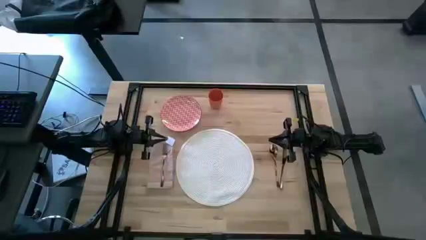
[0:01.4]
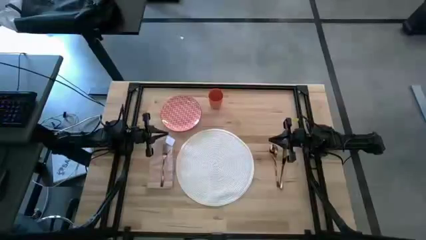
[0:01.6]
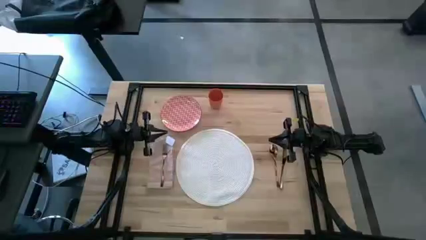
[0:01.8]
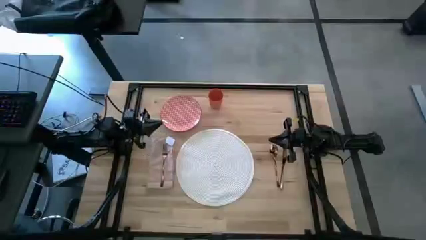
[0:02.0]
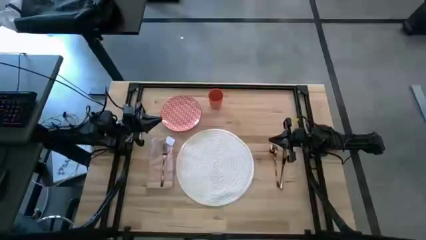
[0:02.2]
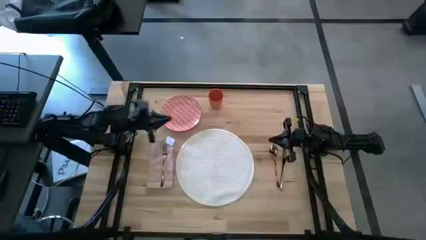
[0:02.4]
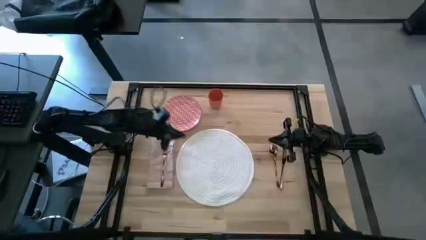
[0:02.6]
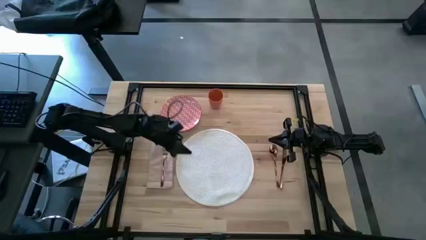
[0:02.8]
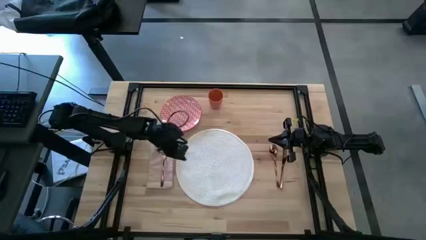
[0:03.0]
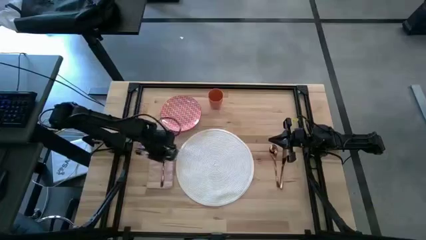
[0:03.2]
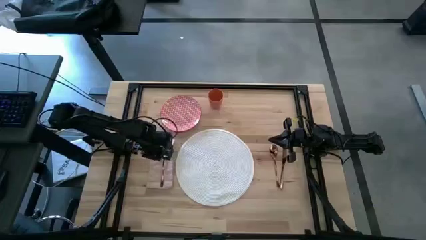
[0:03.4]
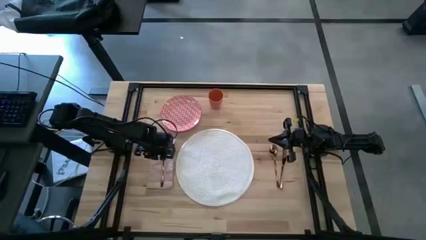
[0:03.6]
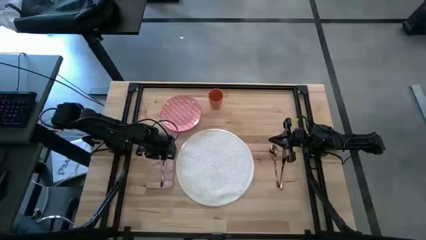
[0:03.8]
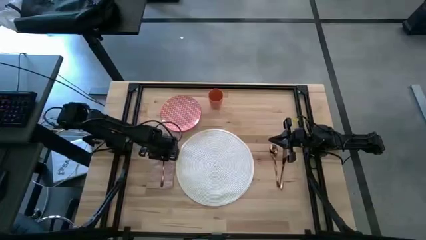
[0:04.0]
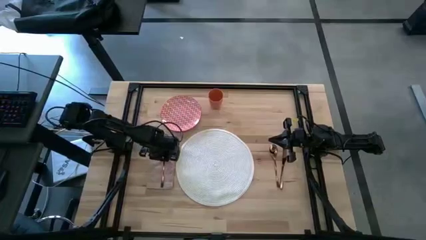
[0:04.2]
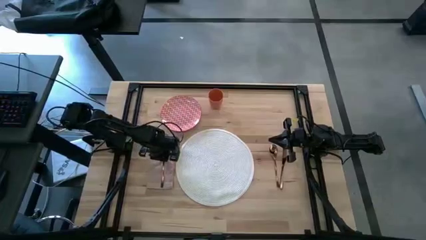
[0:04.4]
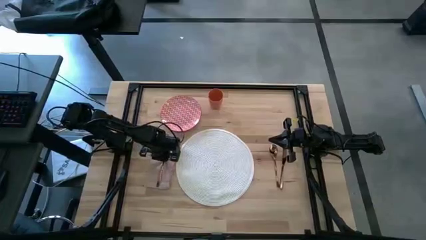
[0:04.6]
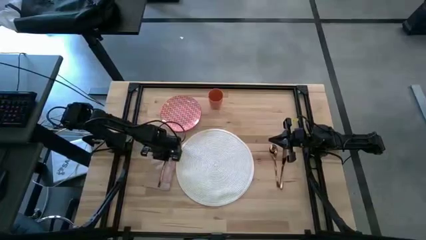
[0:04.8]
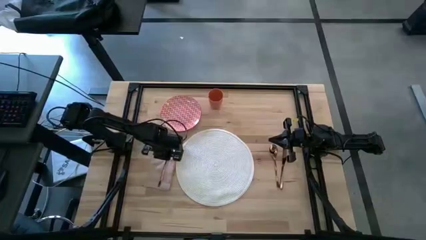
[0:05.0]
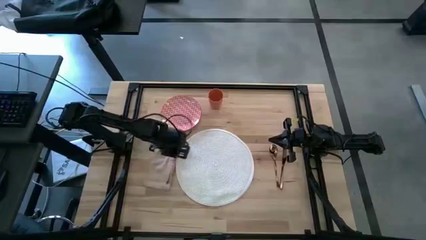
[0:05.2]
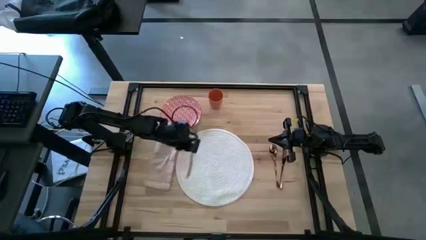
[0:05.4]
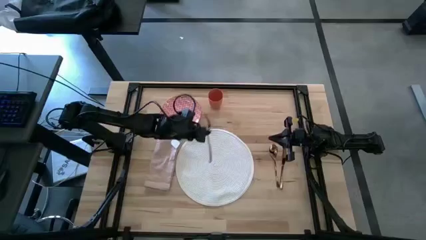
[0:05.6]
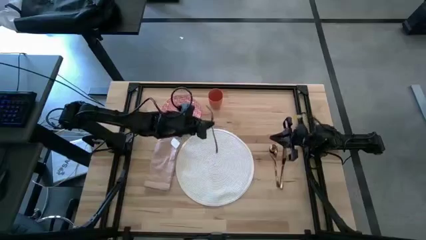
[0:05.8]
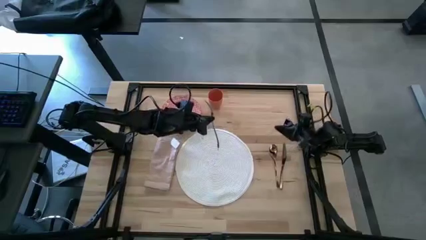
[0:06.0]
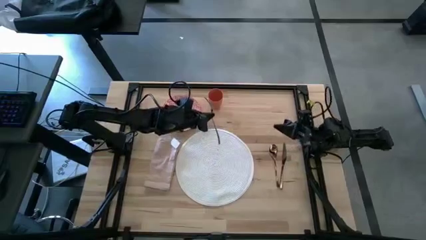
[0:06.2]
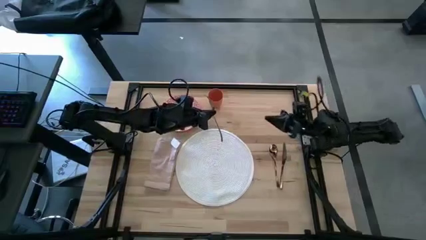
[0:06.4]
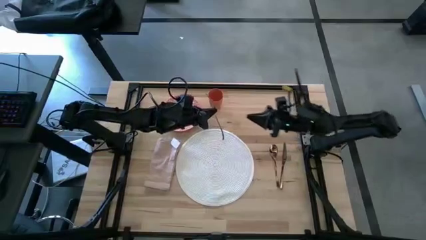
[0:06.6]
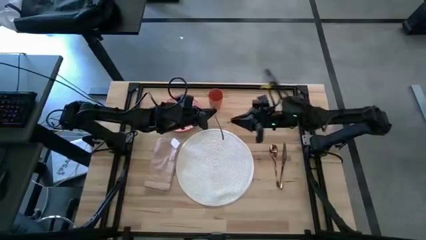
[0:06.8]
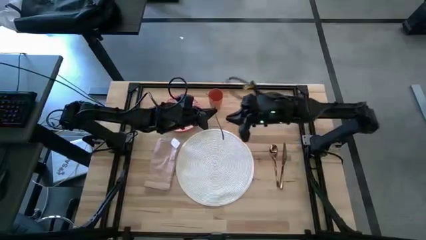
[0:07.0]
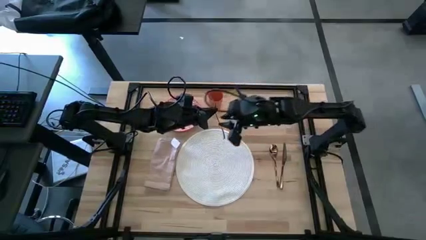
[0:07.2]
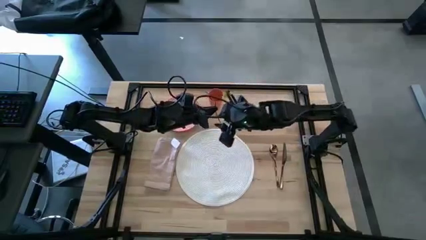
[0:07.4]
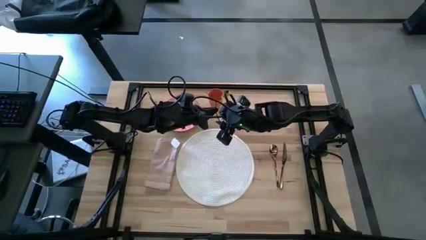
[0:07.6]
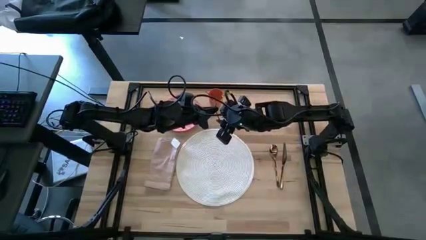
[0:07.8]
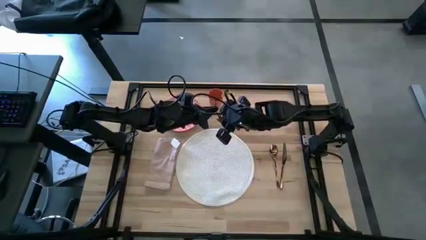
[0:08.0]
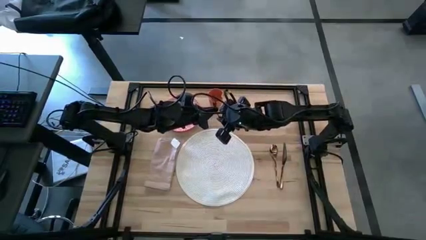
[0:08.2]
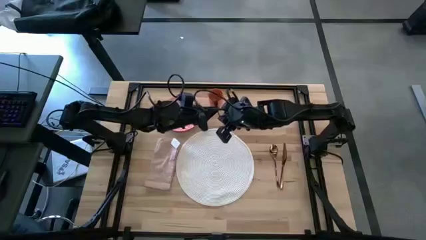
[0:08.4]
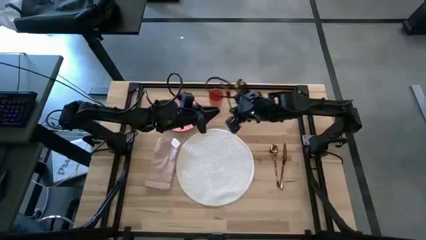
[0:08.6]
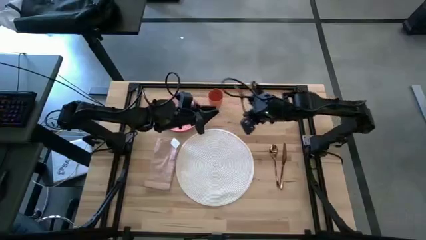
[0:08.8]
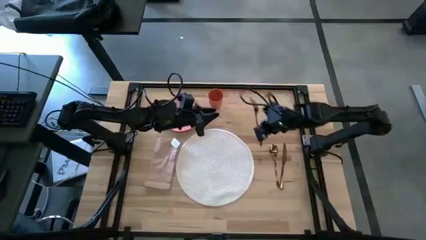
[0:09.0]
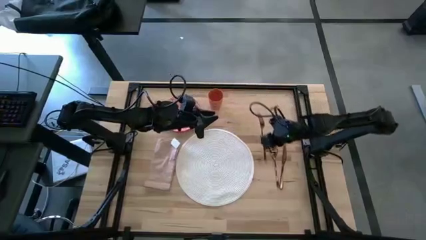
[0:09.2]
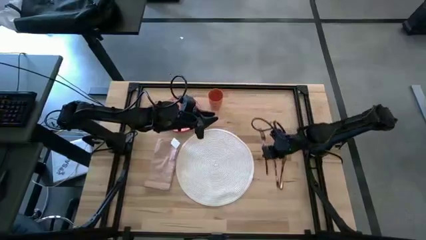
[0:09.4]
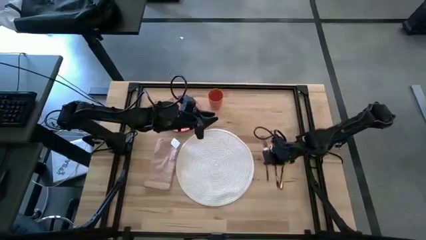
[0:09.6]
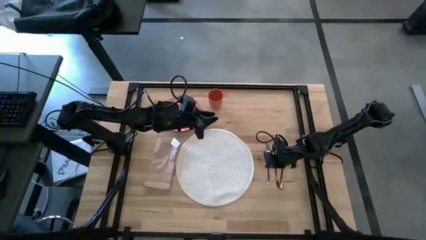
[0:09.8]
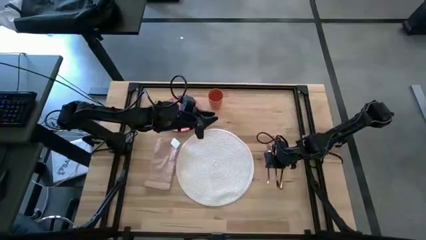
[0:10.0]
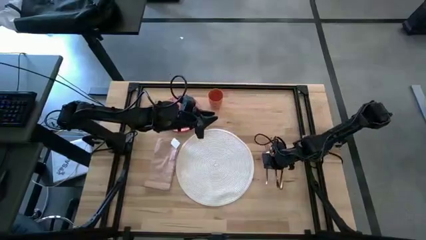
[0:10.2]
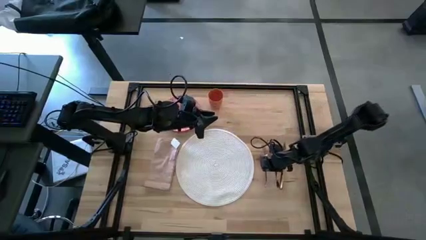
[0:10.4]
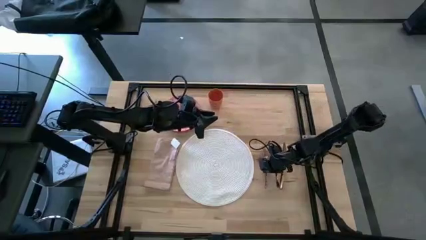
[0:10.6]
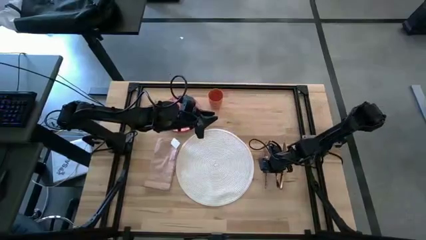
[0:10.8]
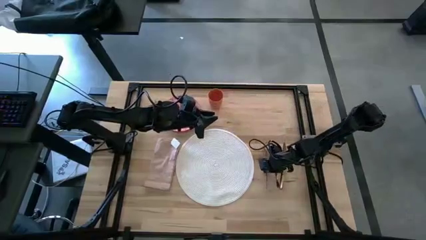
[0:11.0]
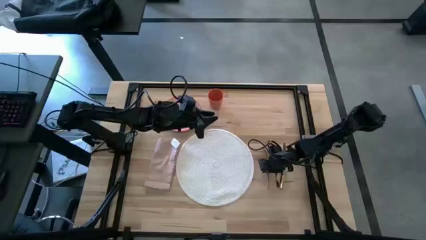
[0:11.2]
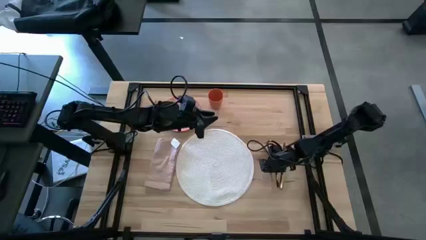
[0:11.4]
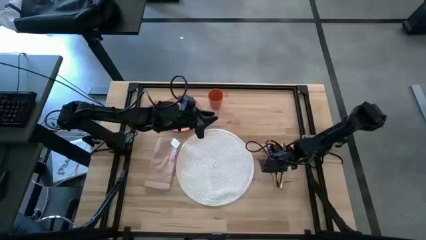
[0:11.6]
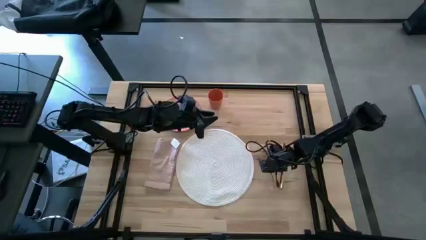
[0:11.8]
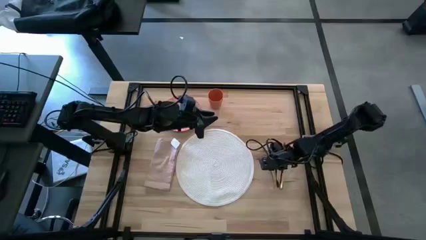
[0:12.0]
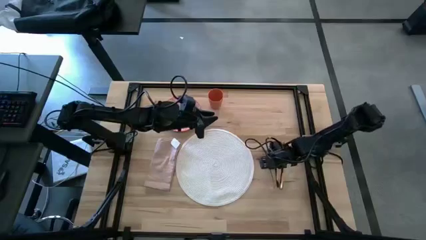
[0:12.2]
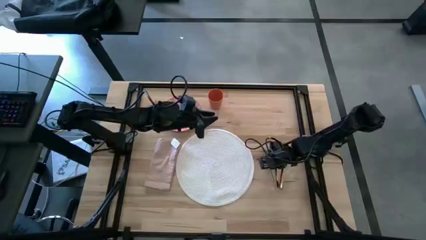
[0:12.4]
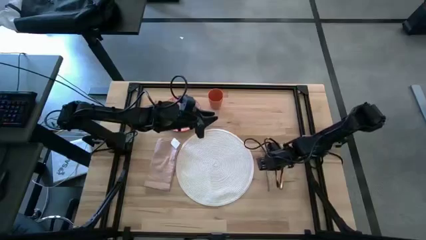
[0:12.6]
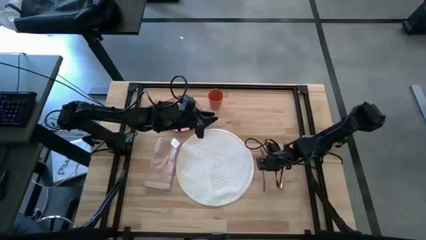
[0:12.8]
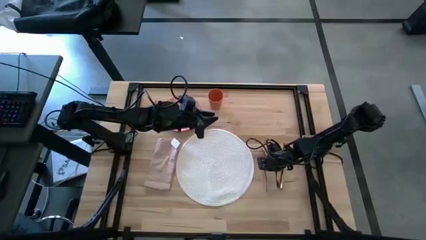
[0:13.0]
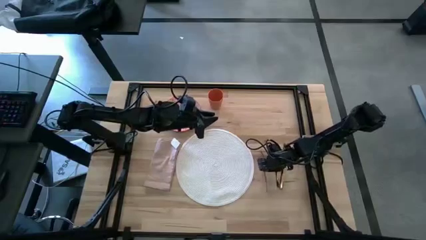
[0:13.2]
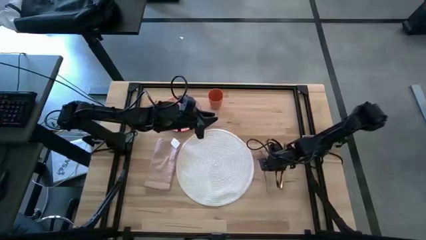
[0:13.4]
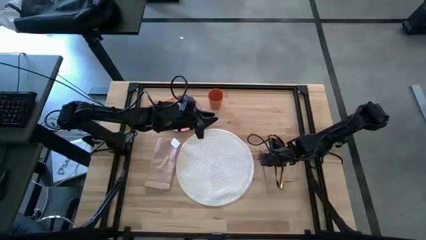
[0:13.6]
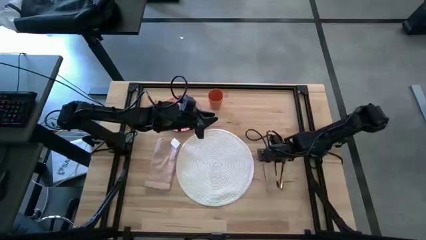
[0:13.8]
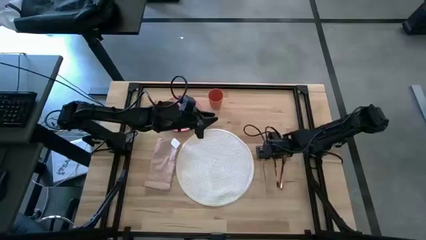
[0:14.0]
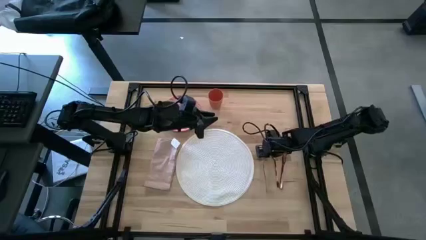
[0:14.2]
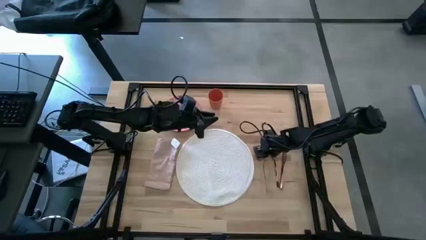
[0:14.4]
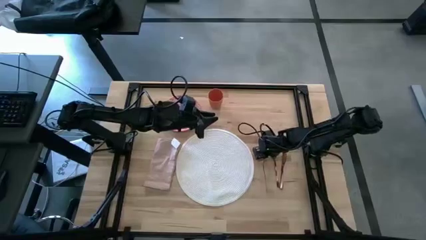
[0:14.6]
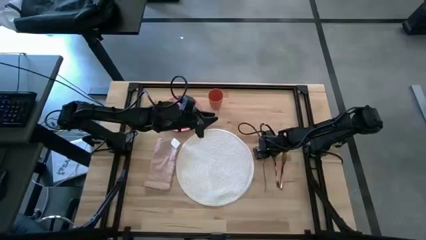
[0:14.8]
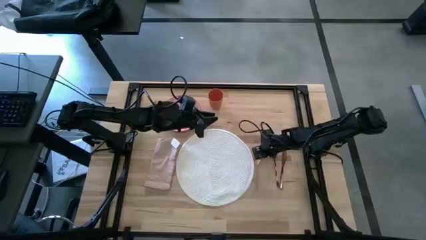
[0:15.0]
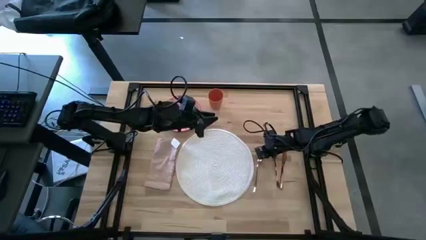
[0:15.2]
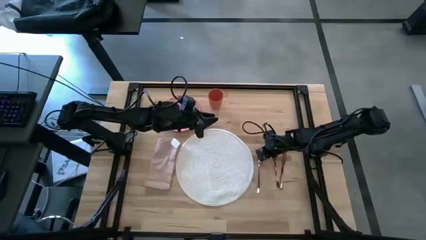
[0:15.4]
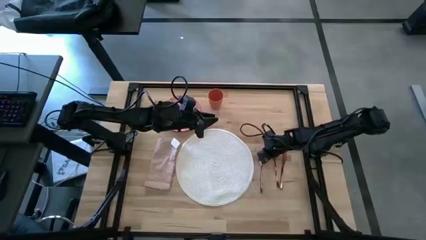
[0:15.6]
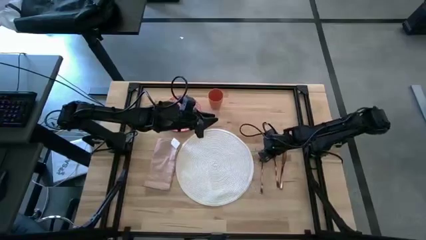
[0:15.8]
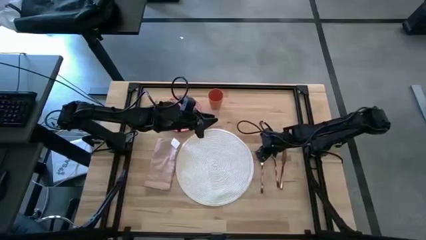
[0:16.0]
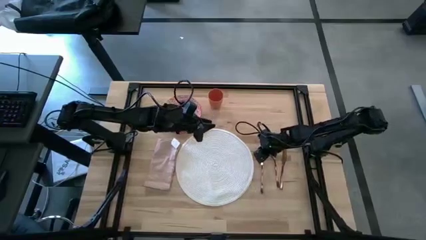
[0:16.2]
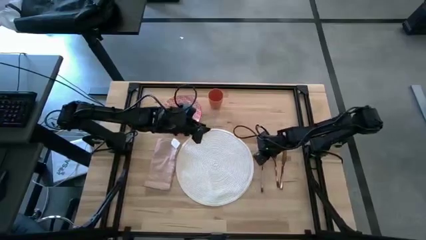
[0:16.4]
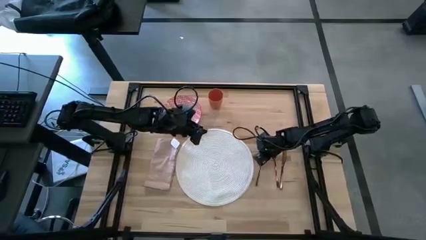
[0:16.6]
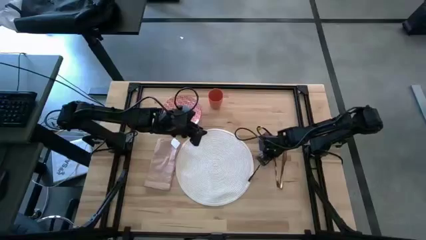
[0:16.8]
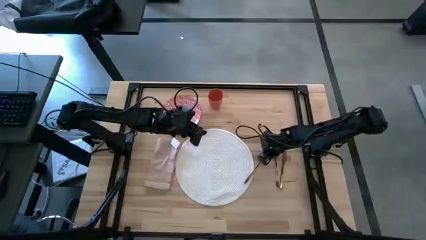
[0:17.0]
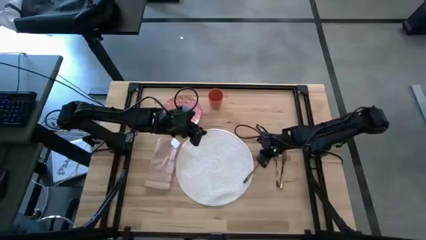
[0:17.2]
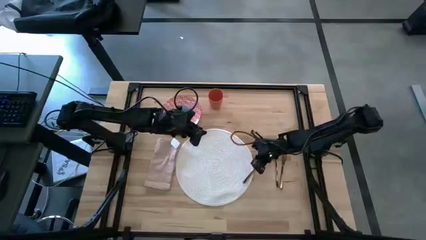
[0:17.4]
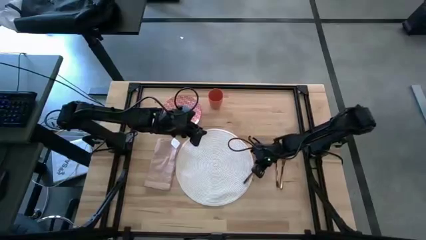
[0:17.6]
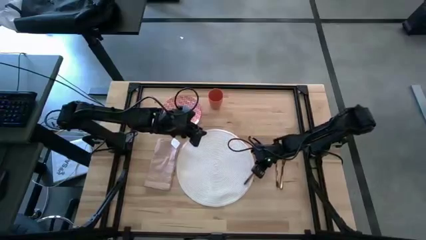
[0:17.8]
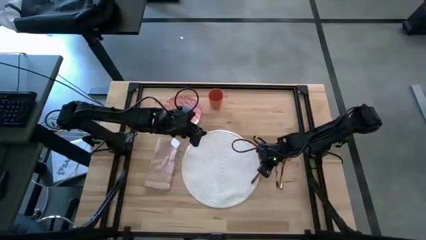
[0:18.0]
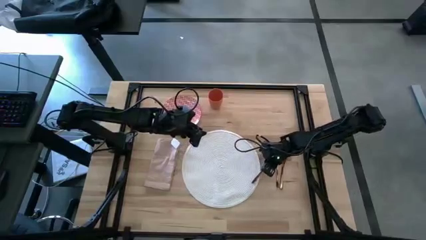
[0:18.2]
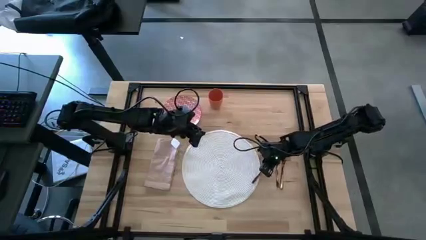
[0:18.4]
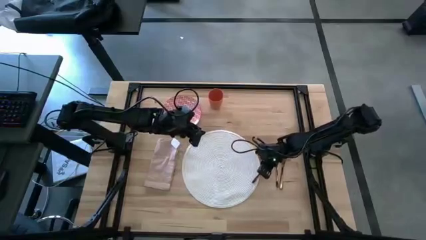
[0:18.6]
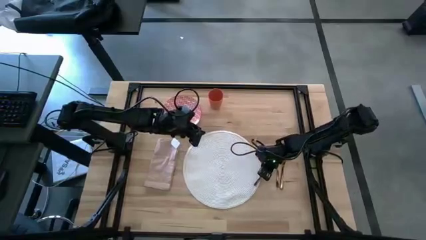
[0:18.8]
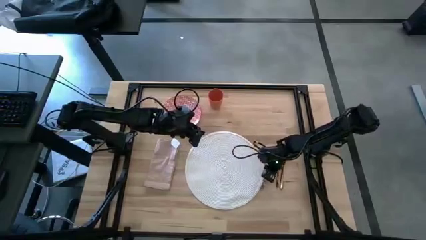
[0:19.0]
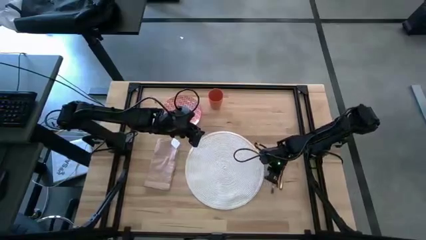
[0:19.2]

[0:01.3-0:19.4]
Task: Set table place
Put the gold fork to the left of the gold spoon
